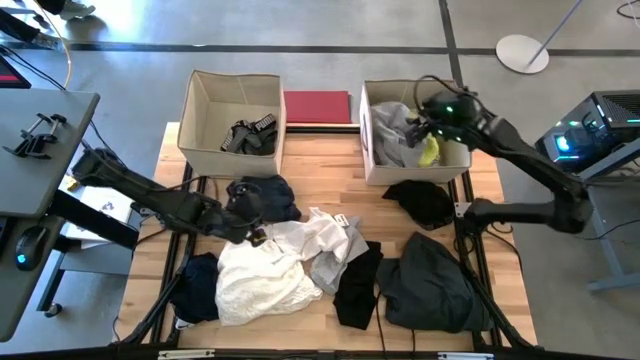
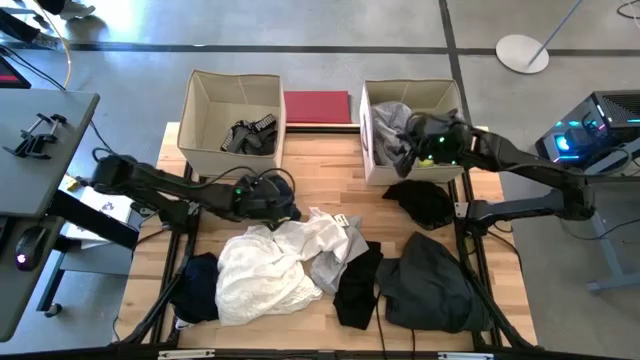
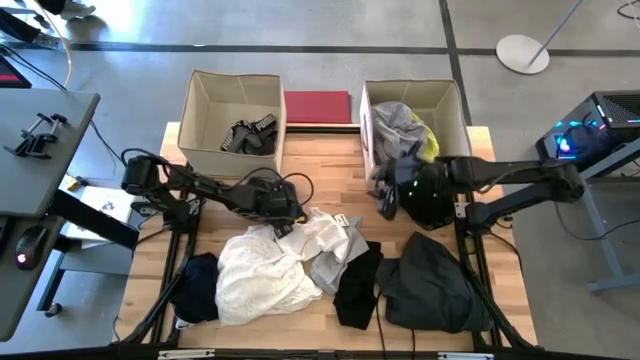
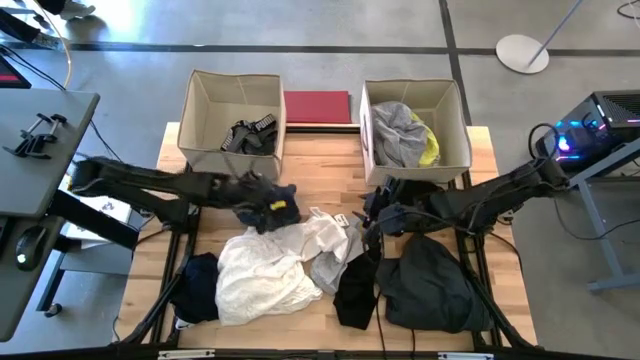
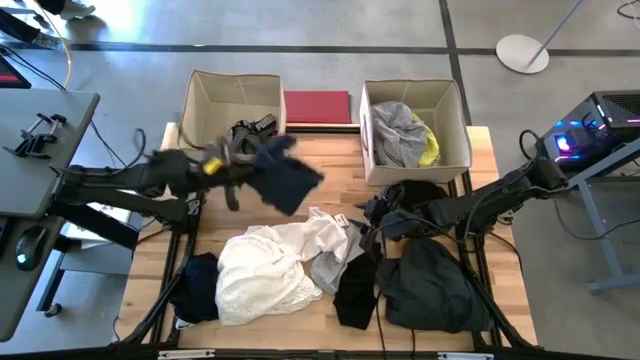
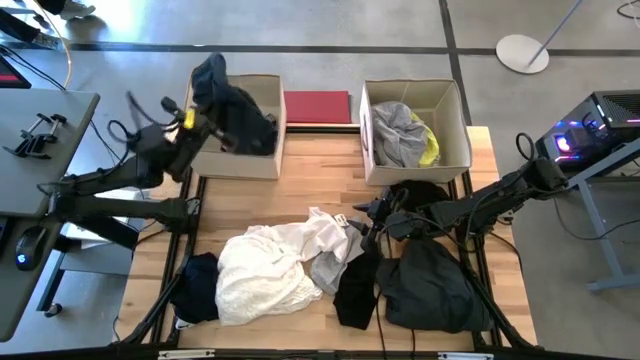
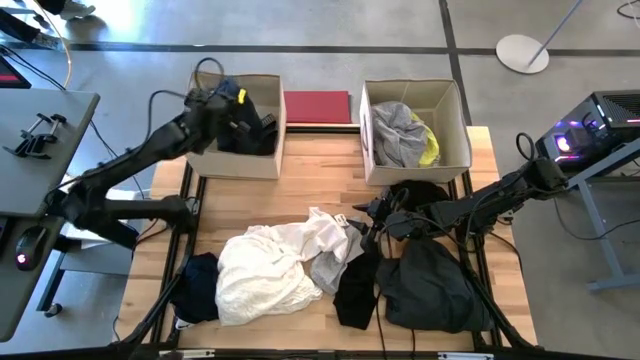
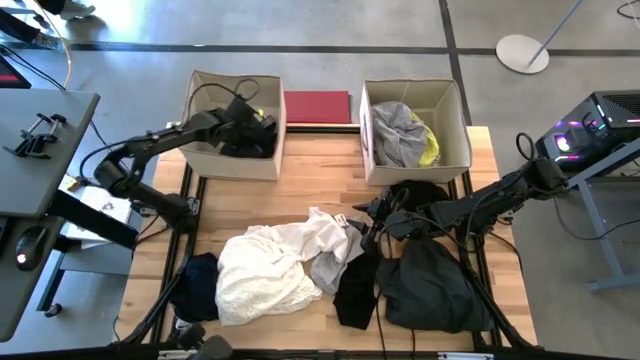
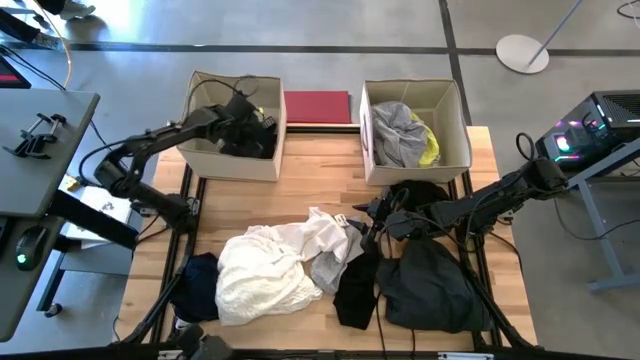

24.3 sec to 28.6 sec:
Task: Sort clothes
Put the dark blue cloth into the left laundry organizer

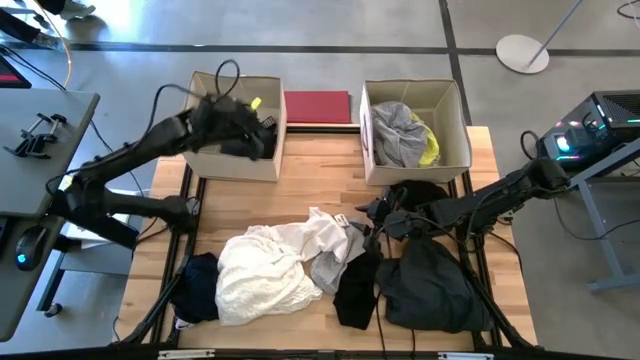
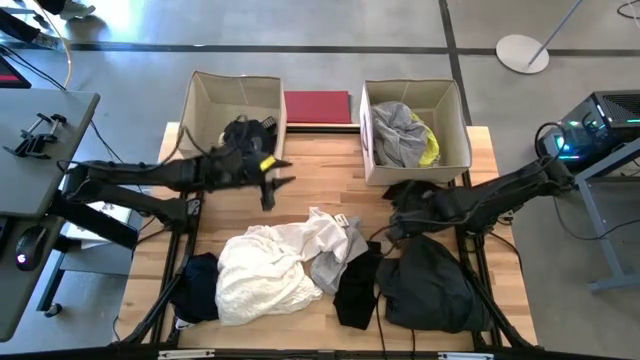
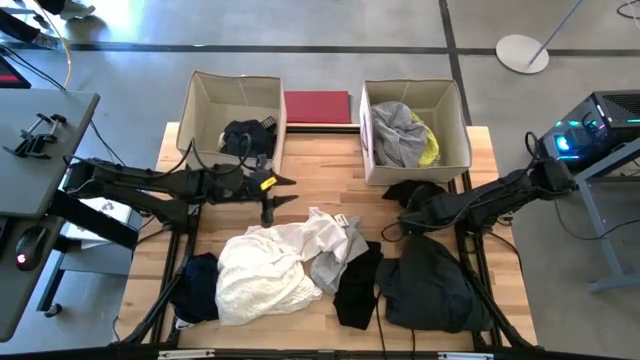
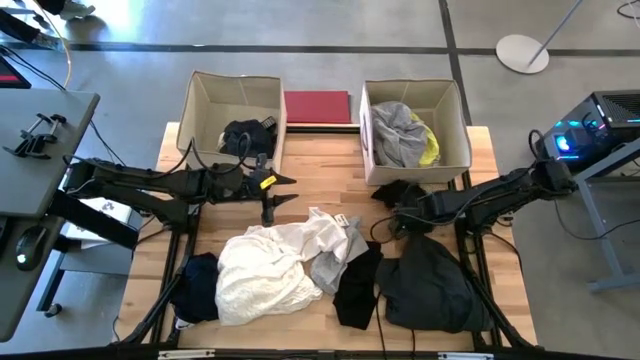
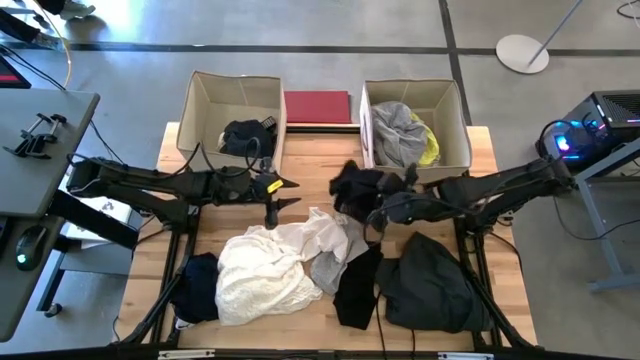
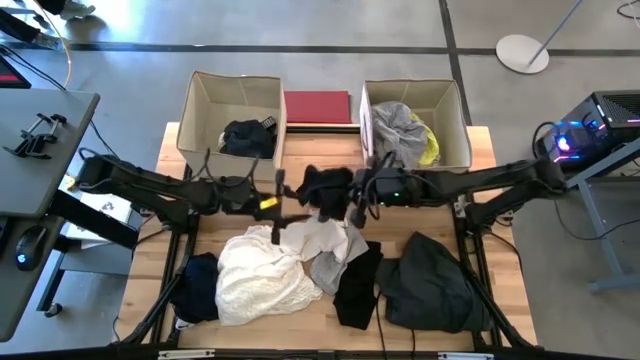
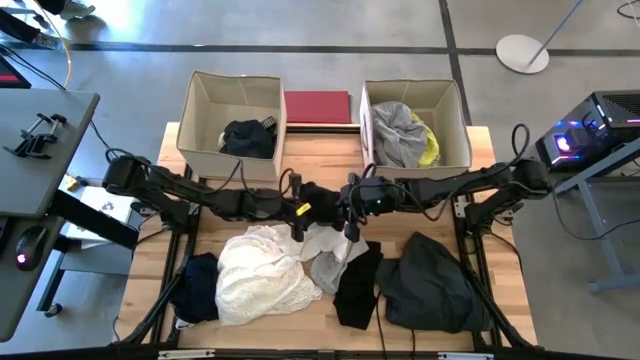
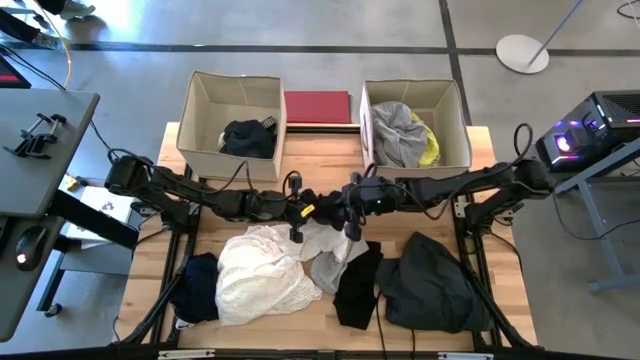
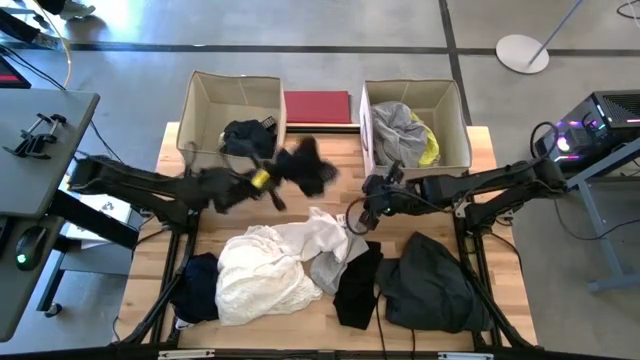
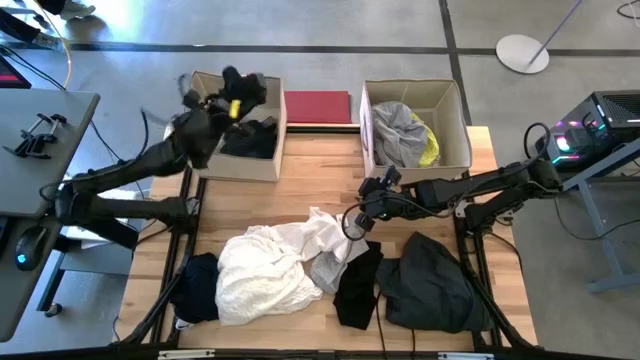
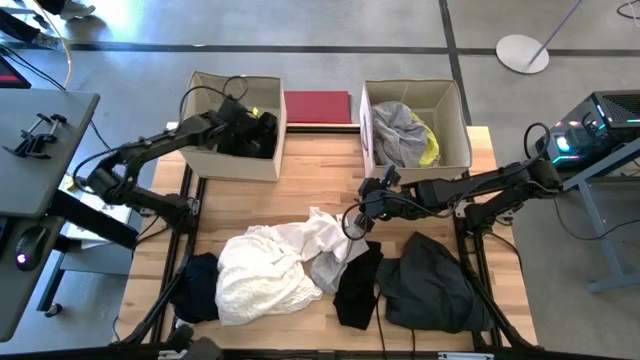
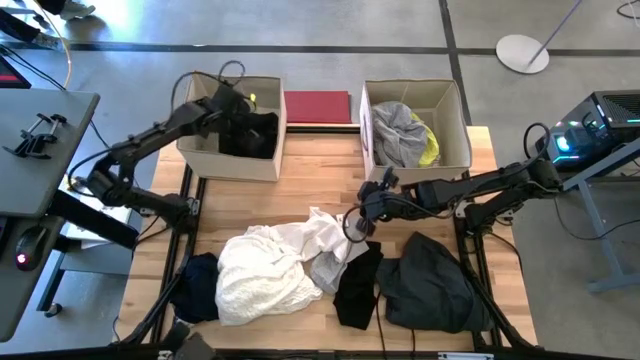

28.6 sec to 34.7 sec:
Put the black boxer into the left laundry organizer

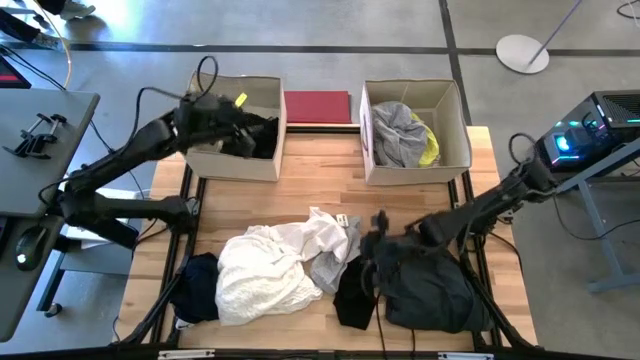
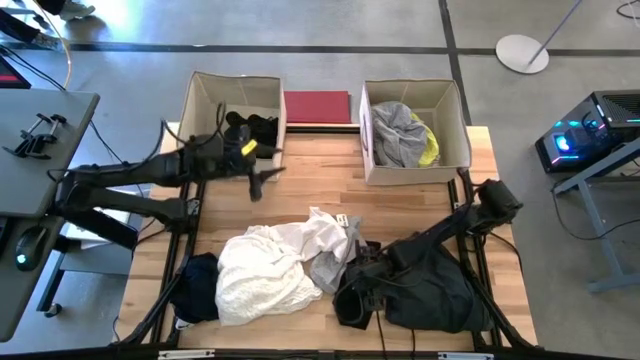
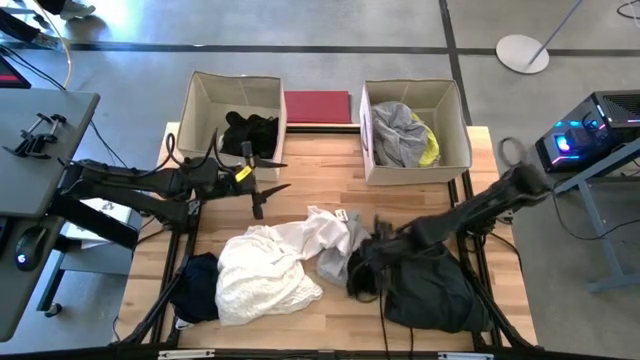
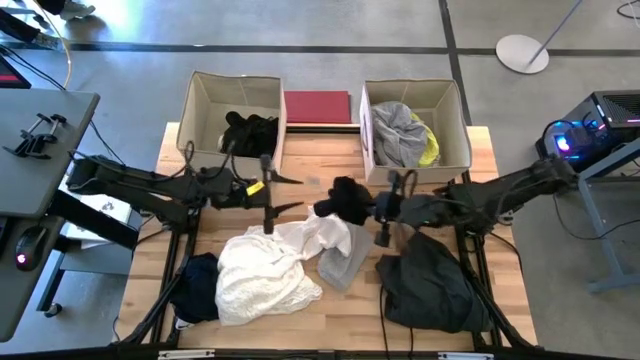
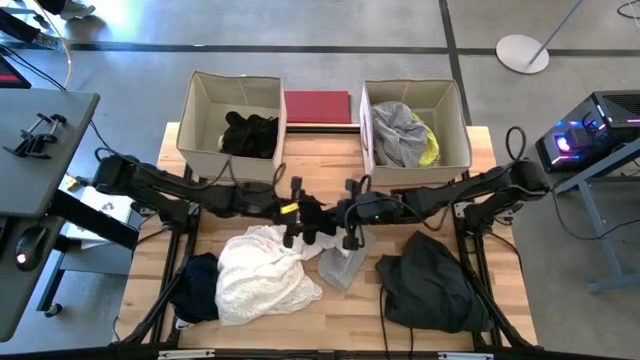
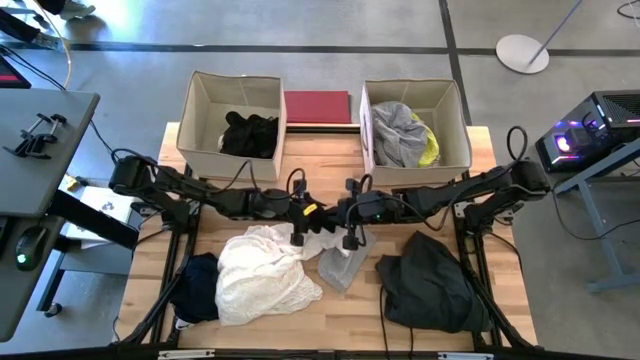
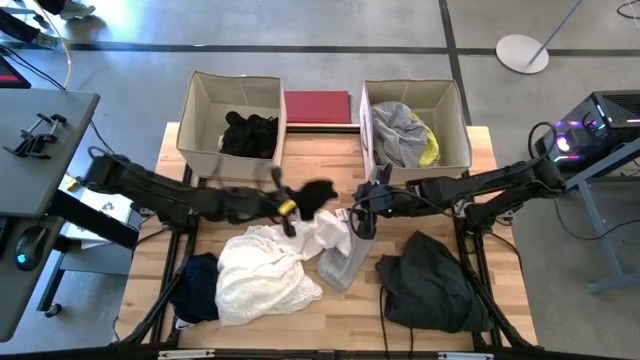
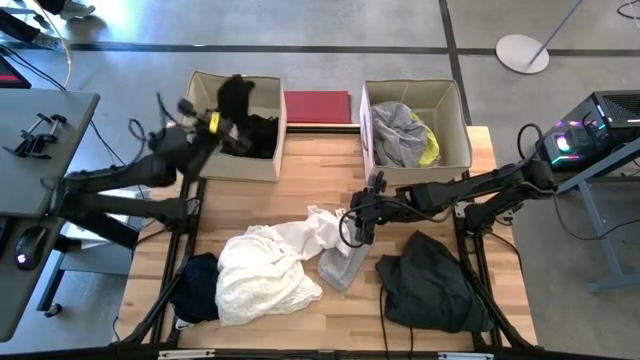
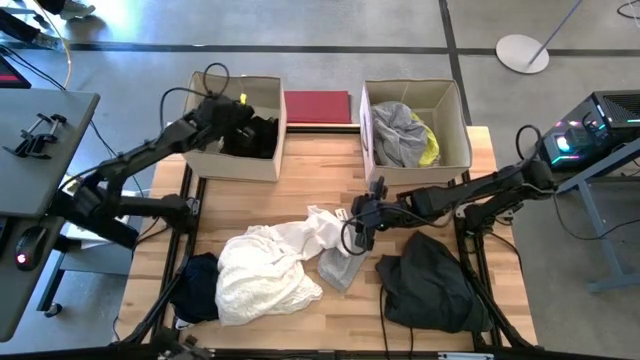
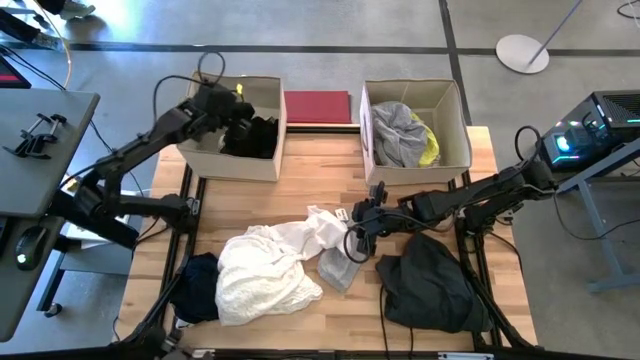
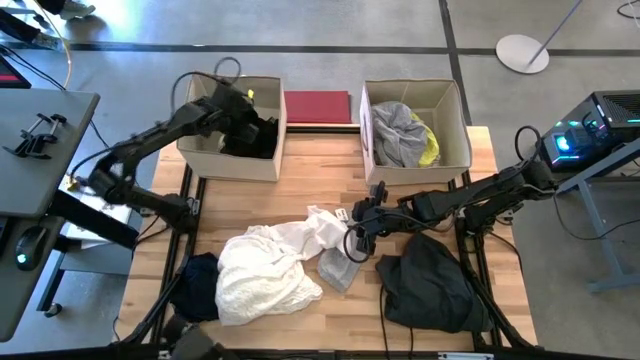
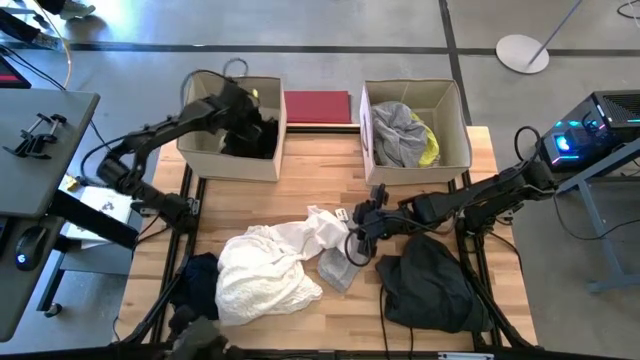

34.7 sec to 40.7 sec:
Put the black cloth into the left laundry organizer

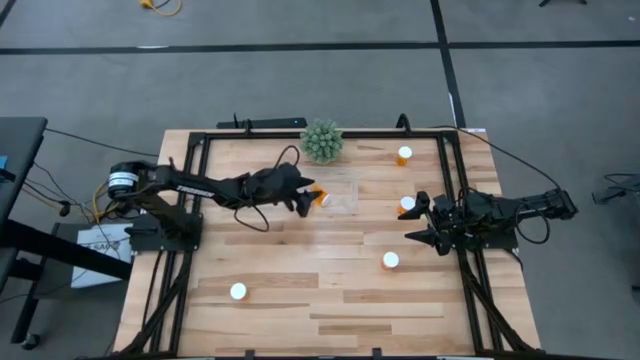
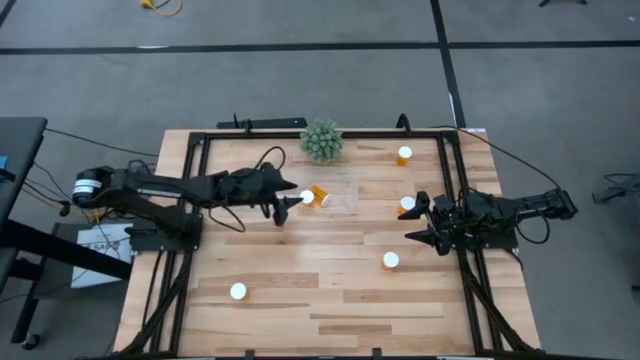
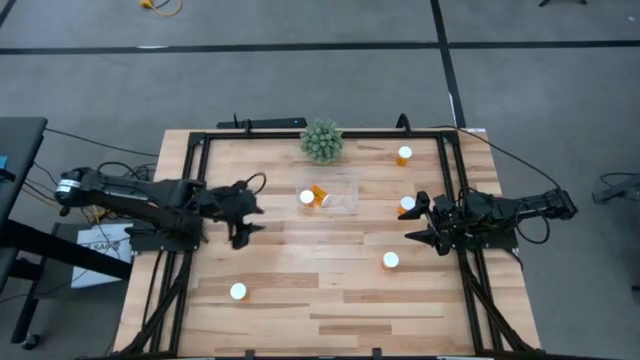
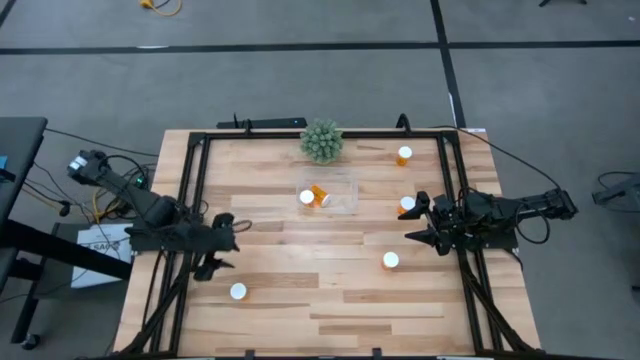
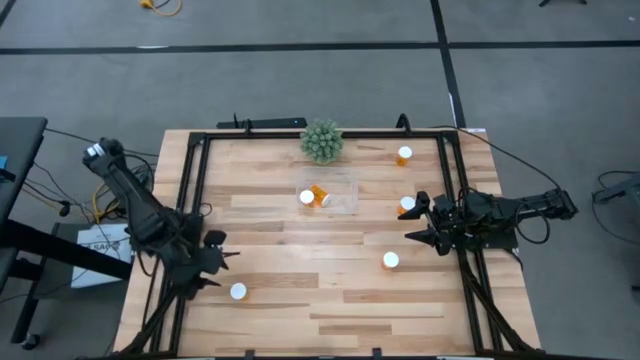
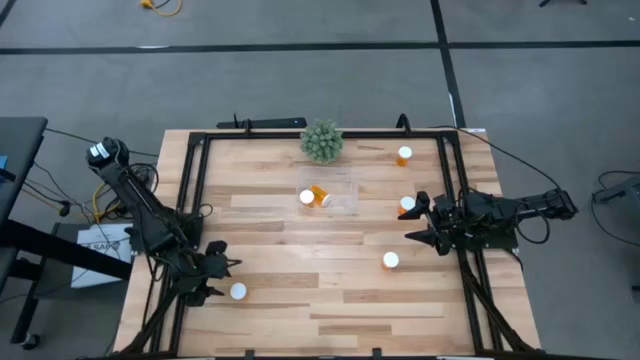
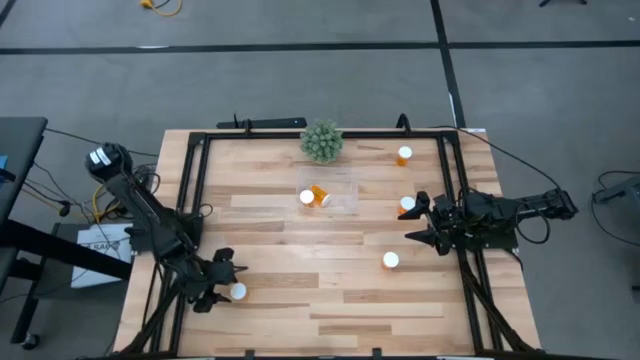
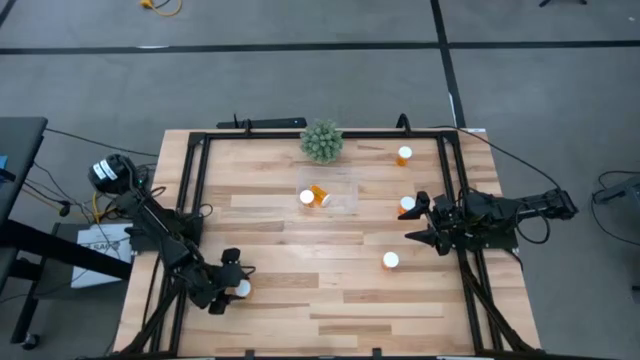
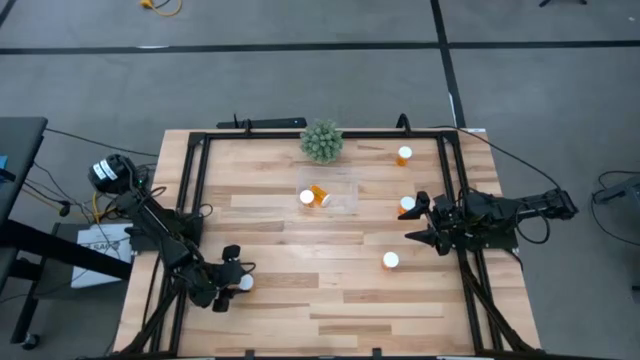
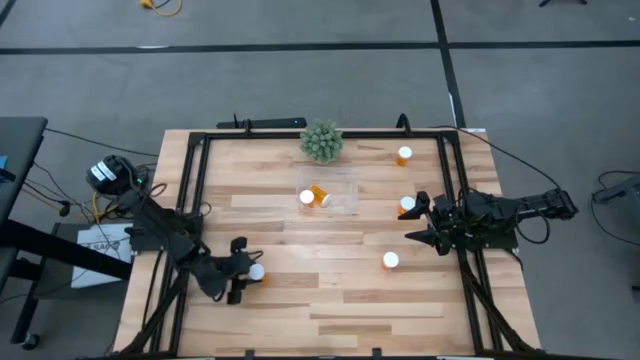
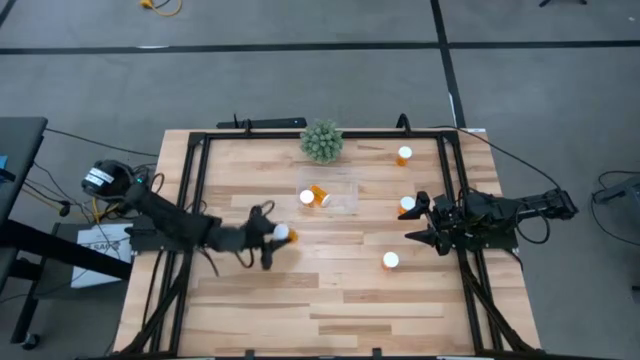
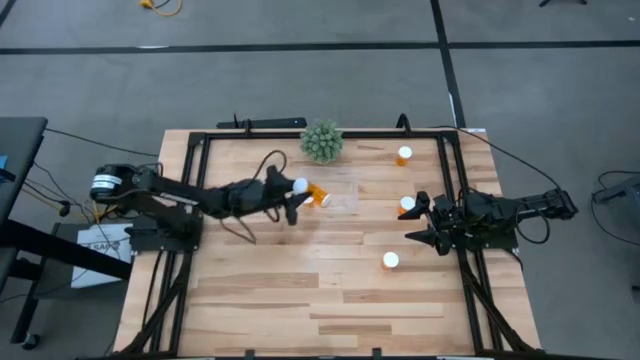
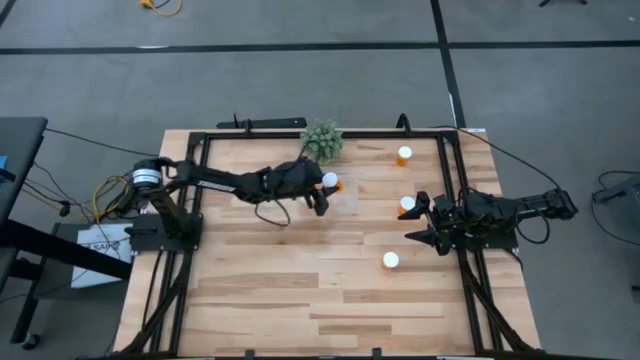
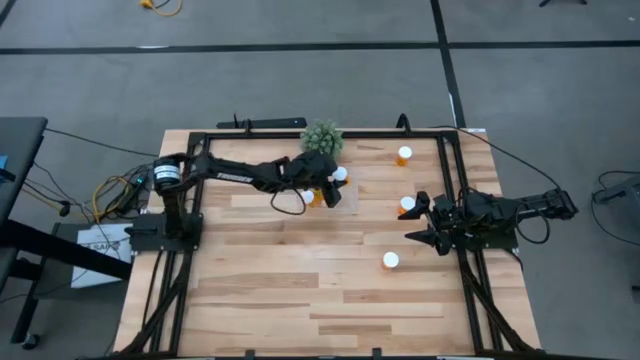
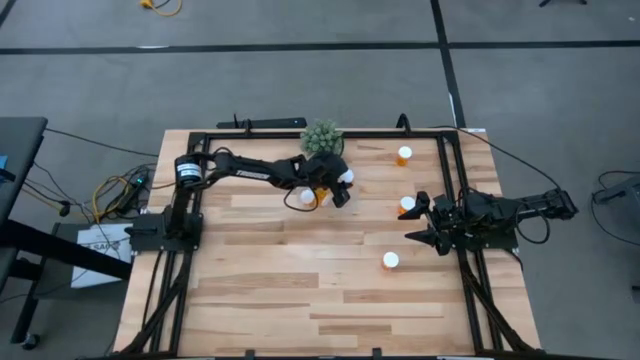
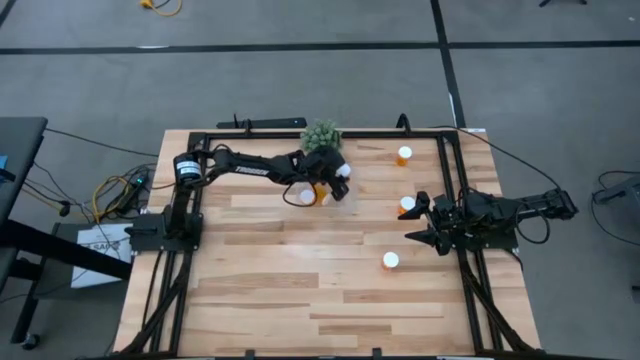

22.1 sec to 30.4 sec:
Task: Pick and place pill bottles into a basket
Put the orange pill bottle into the transparent bin
